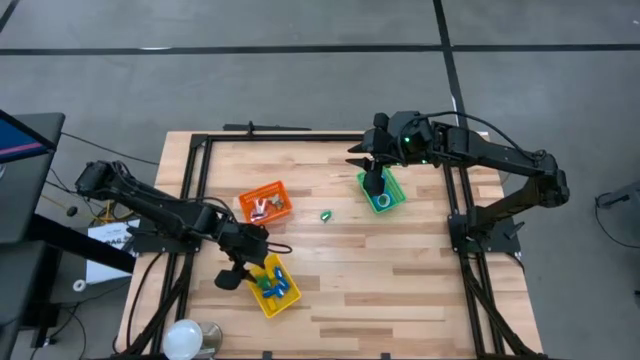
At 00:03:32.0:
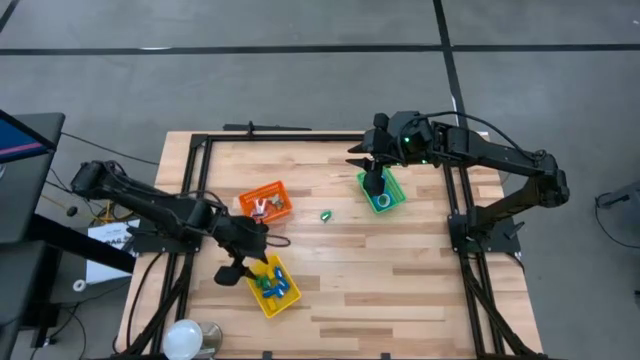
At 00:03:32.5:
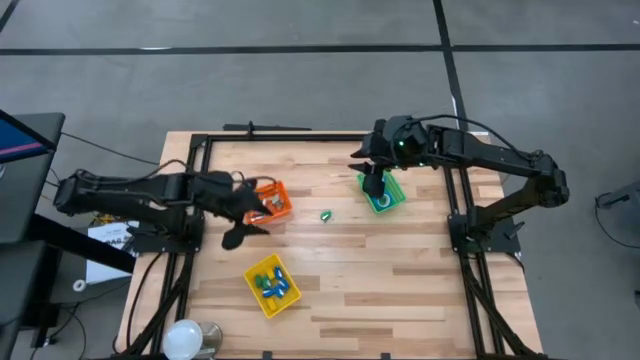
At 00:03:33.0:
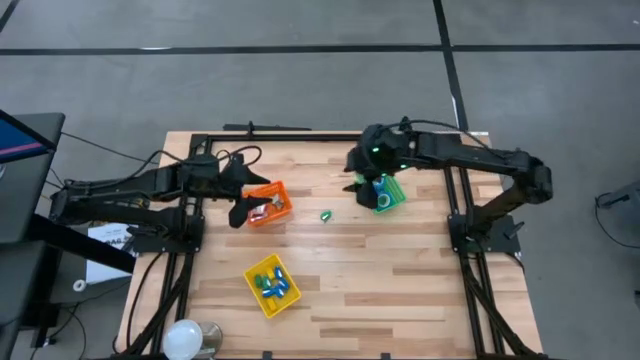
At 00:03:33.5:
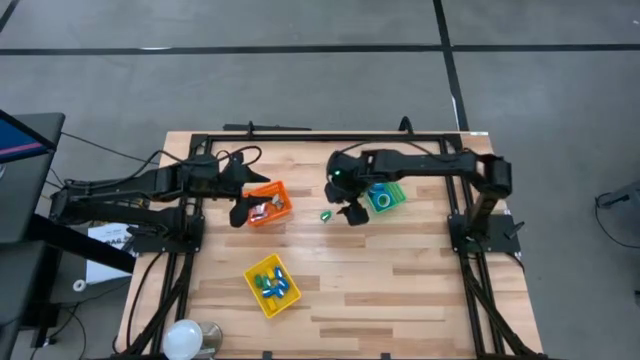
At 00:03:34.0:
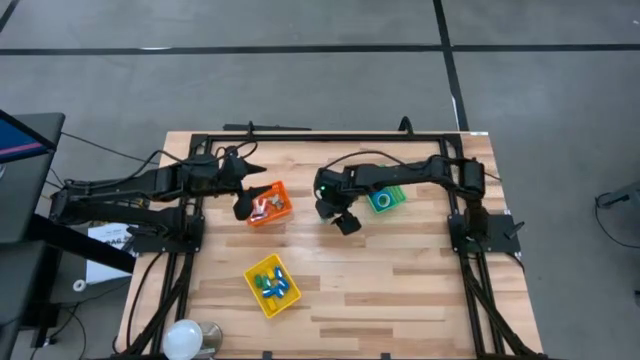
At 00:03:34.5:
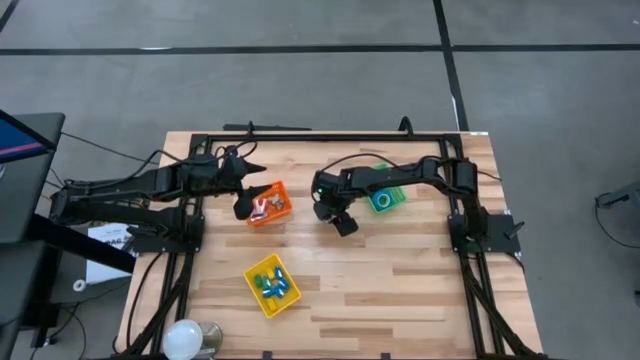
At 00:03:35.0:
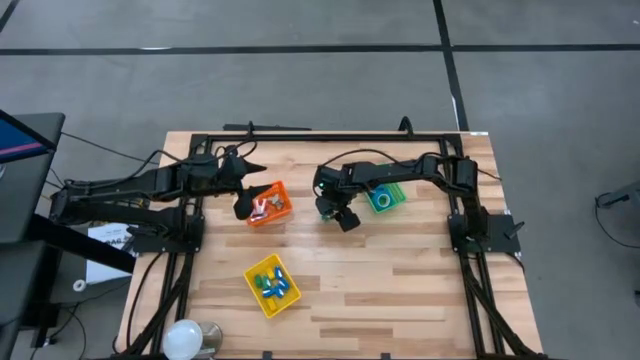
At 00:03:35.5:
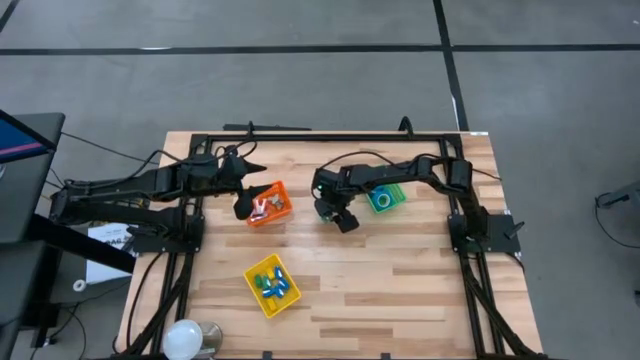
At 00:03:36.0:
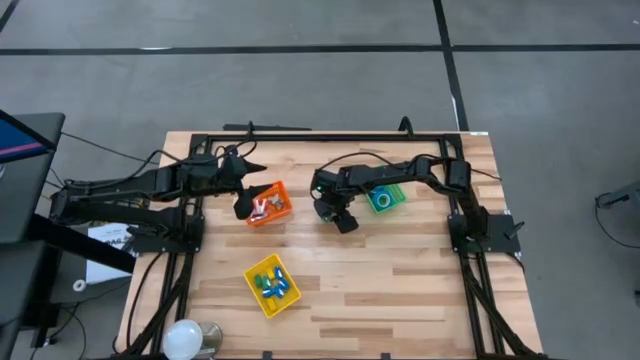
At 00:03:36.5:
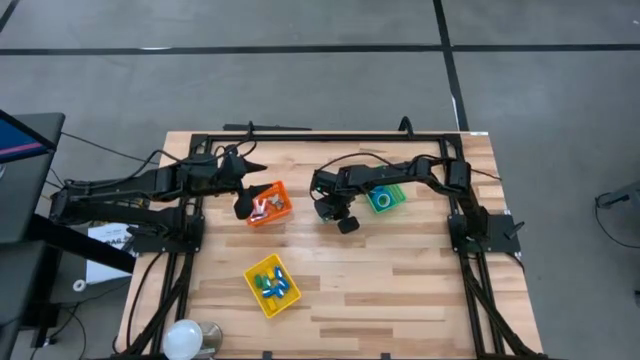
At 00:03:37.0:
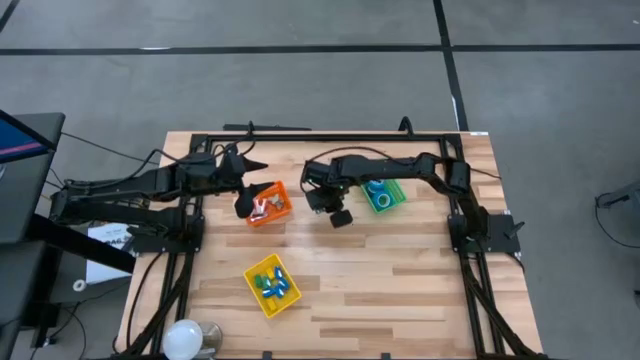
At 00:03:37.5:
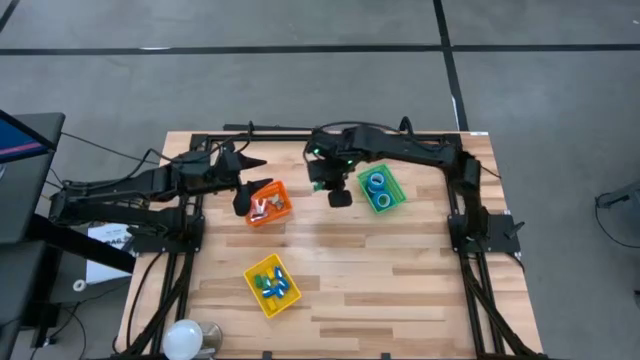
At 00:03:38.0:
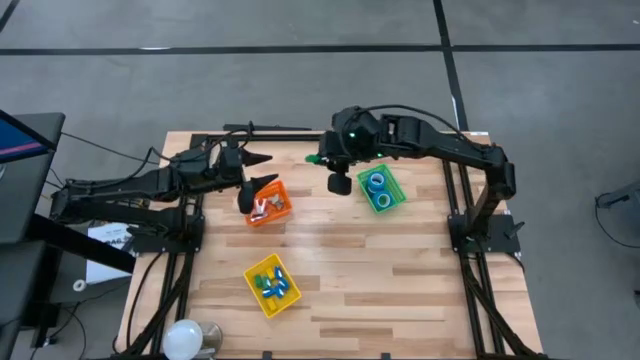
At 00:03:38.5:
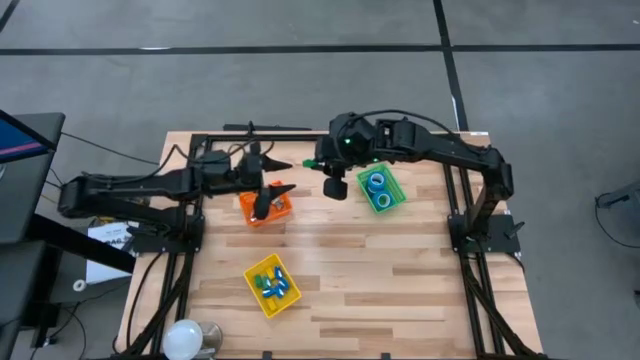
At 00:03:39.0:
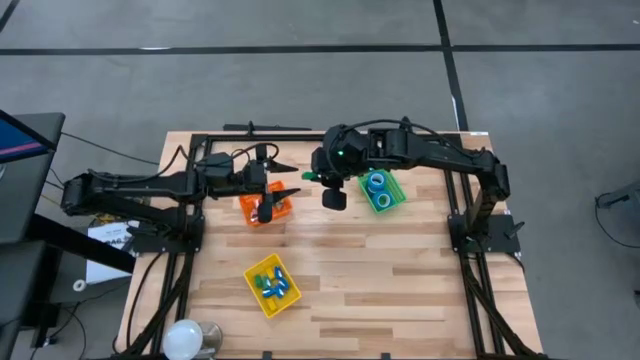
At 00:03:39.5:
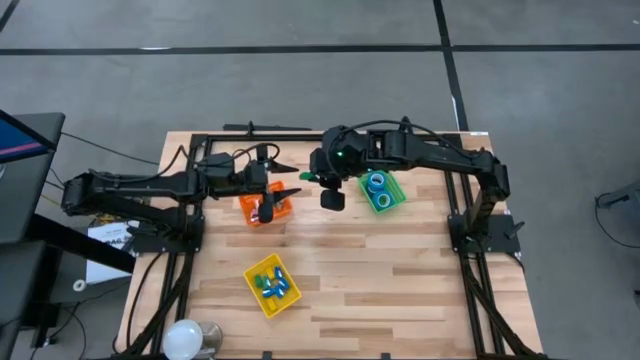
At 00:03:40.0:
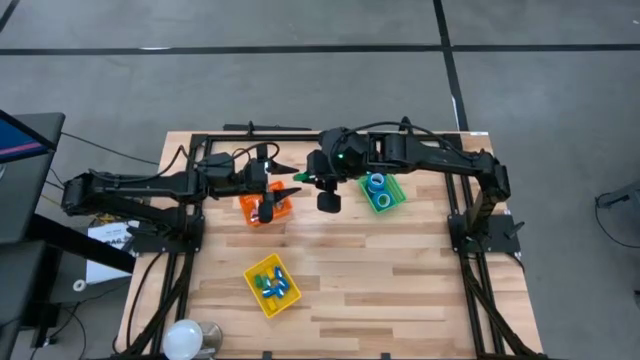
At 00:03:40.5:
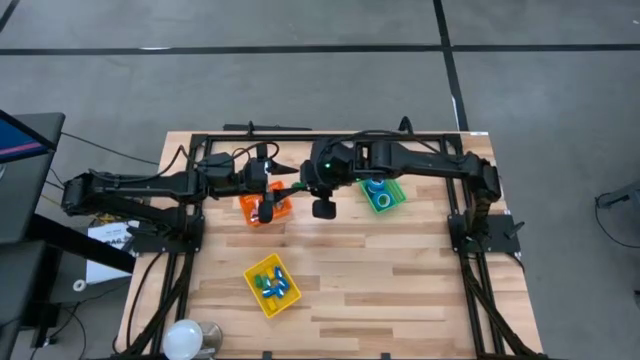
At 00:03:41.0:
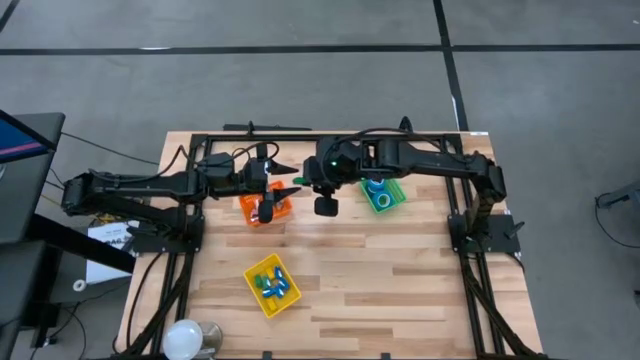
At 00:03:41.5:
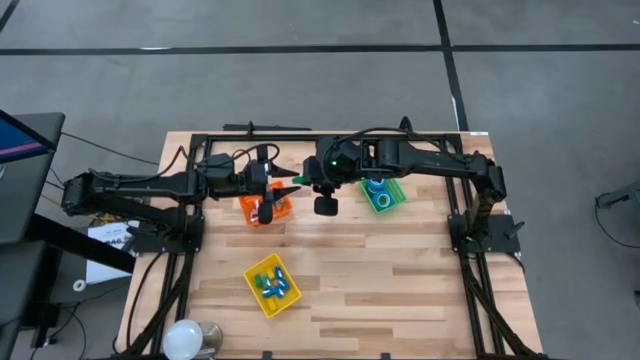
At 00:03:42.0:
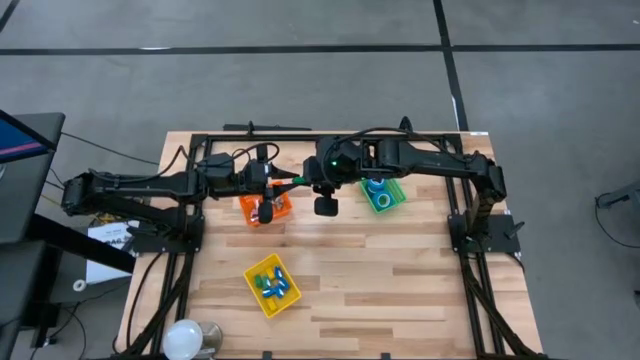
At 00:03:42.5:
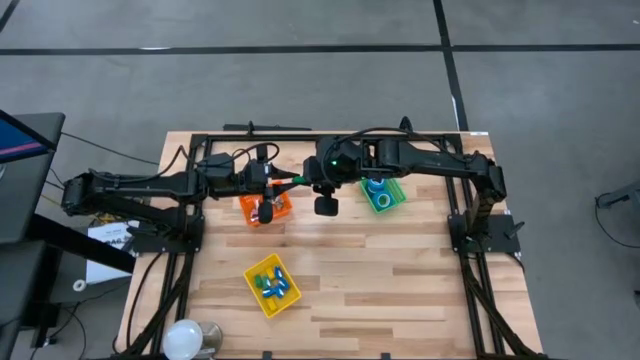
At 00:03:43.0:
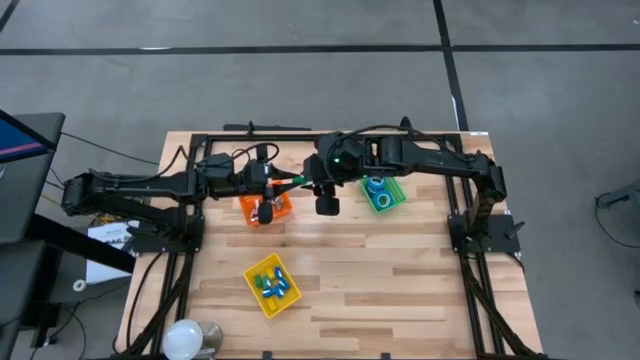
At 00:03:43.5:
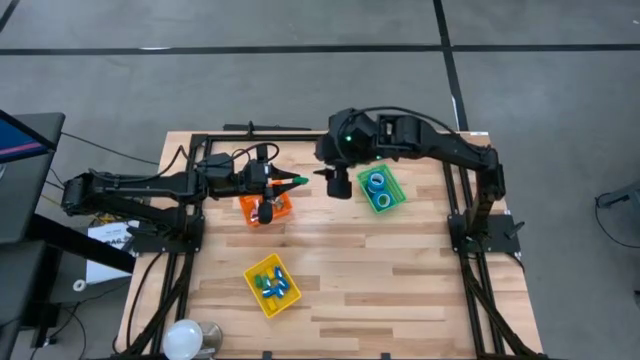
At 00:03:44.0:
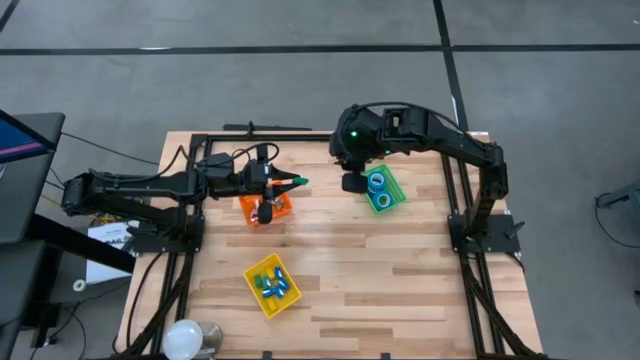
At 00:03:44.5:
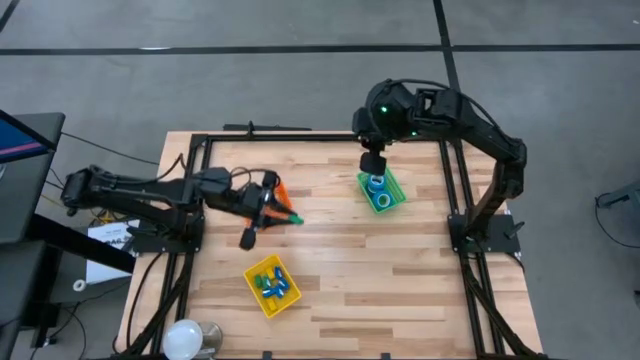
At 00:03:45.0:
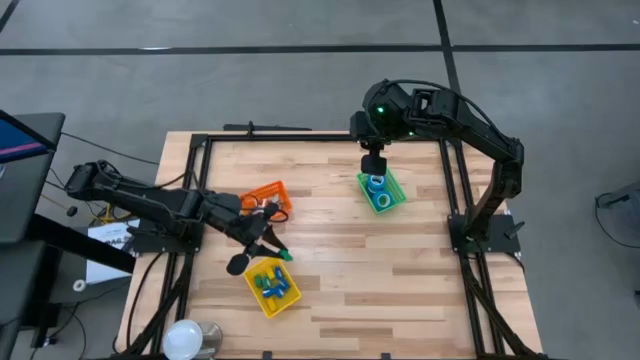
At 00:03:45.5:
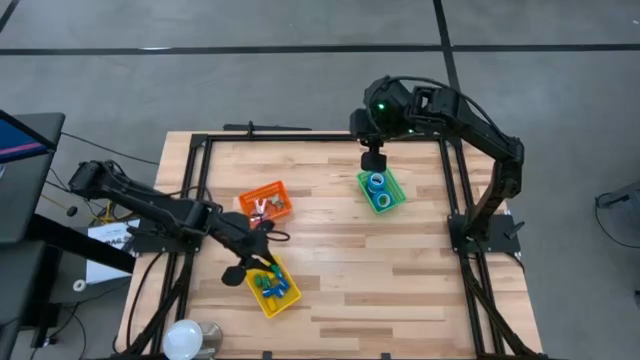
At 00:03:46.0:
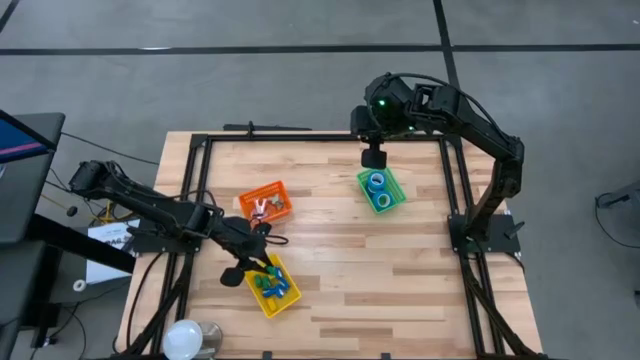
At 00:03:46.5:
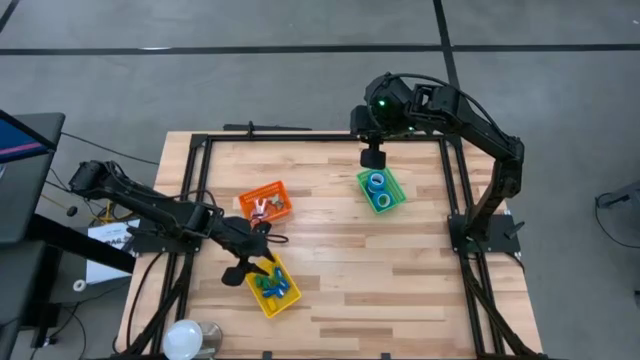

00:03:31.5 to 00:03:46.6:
Task: Pick and place Stapler, Stapler remover, tape
Put the green stapler into the yellow basket

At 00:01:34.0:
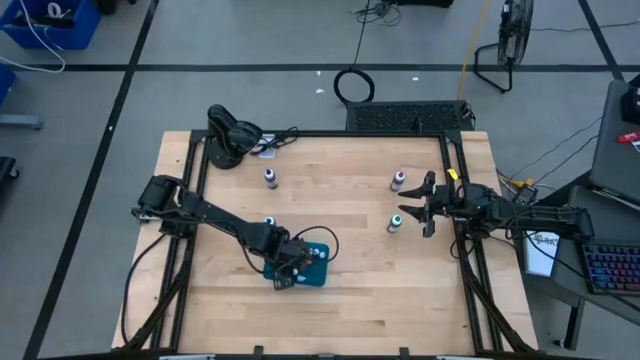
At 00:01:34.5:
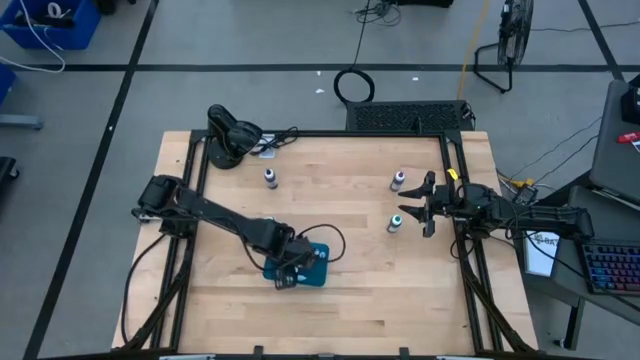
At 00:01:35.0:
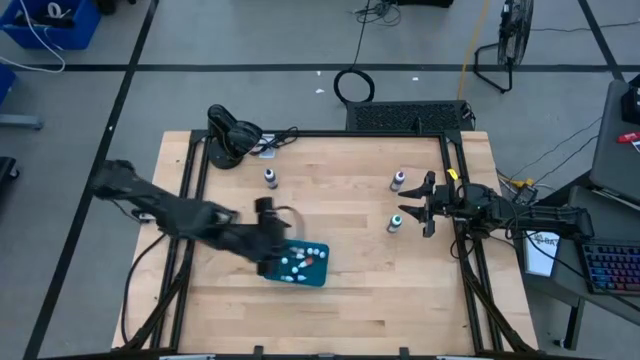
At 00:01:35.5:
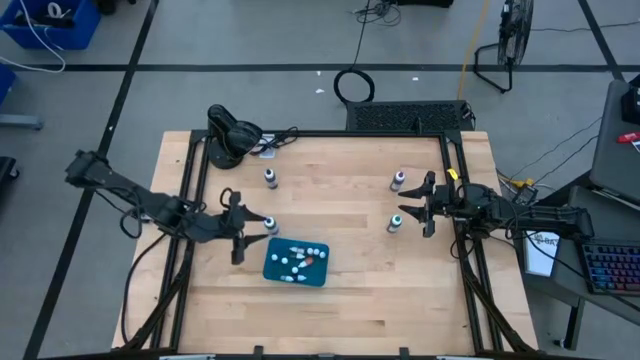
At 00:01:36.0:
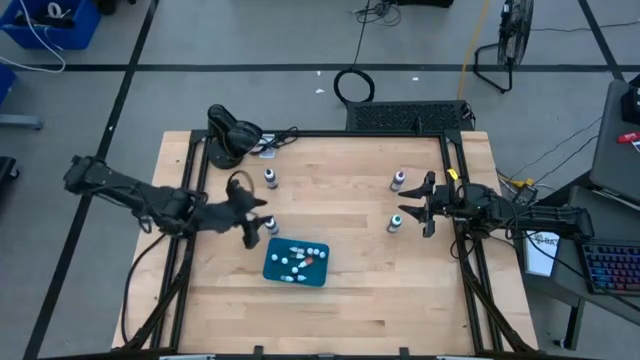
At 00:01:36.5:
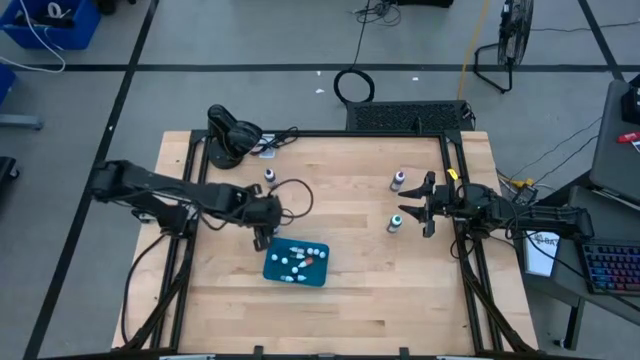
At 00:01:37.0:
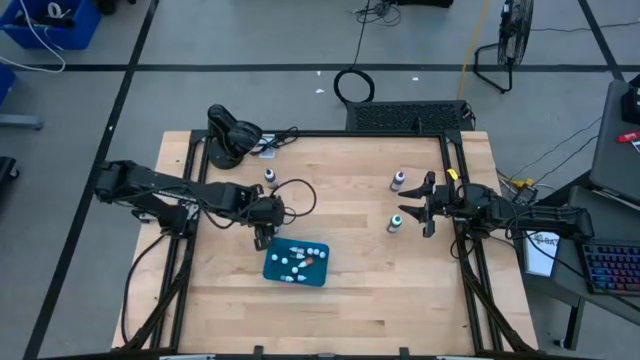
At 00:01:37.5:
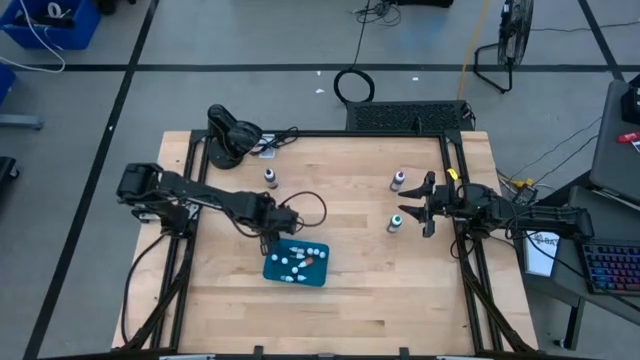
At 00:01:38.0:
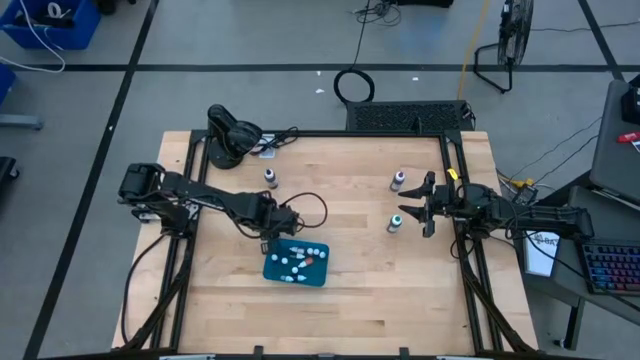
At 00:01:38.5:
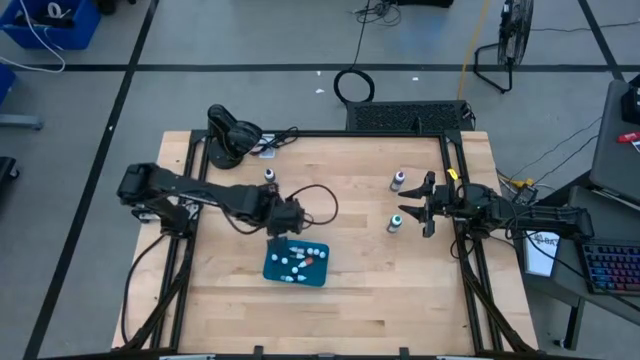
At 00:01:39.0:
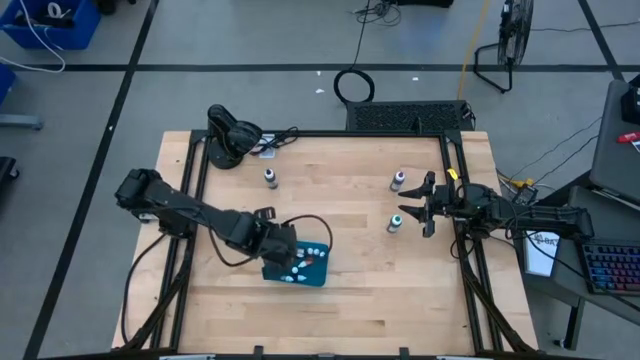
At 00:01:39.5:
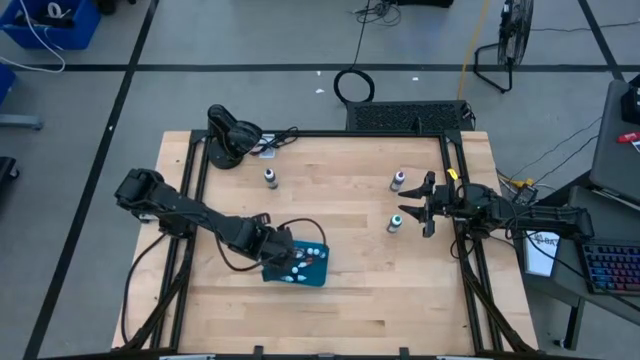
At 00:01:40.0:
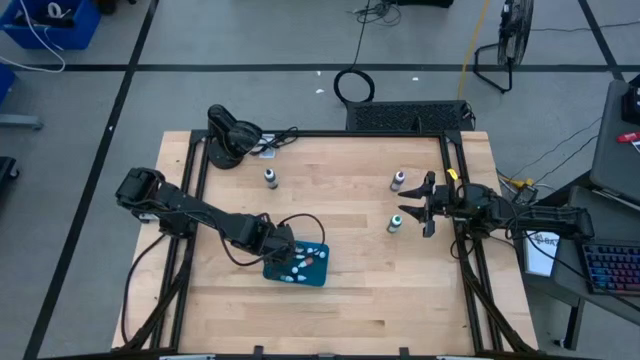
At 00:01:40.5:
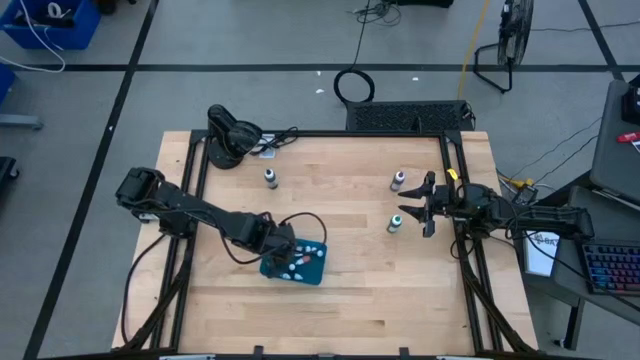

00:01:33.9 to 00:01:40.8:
Task: Pick & Place food coloring
Put the large blue coloring bottle into the blue bin
